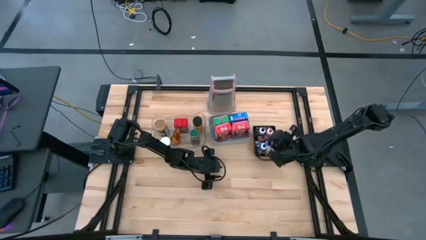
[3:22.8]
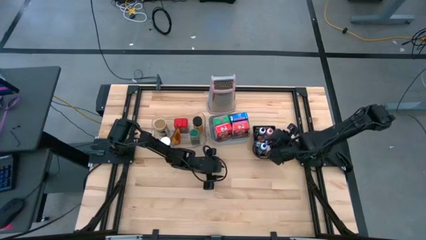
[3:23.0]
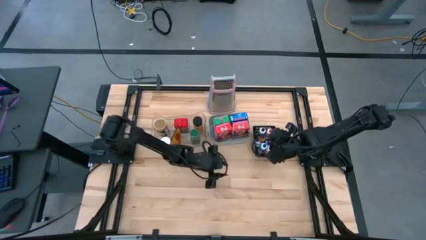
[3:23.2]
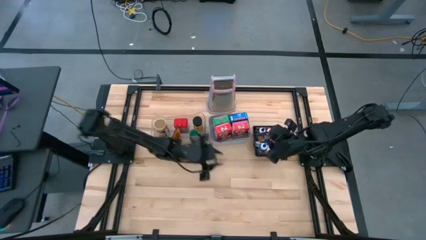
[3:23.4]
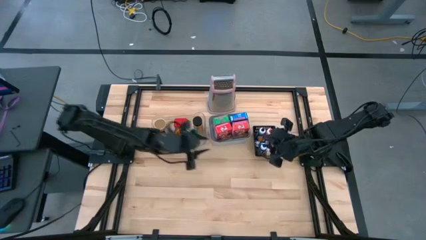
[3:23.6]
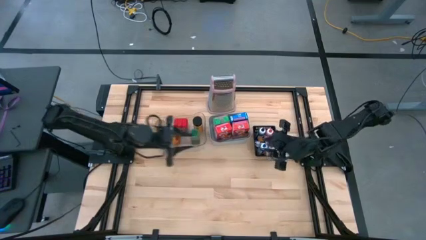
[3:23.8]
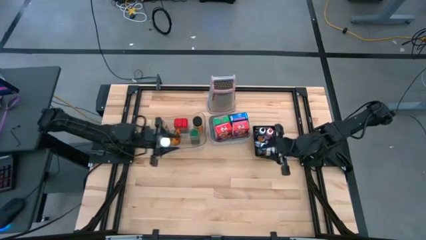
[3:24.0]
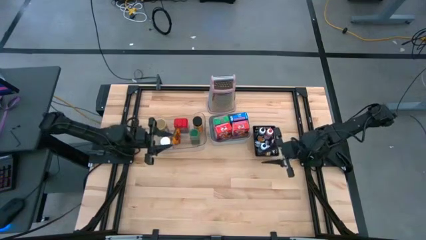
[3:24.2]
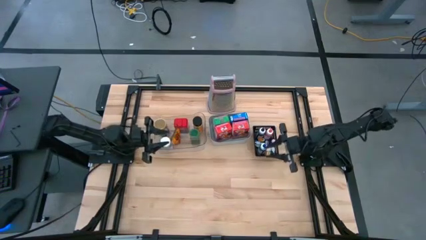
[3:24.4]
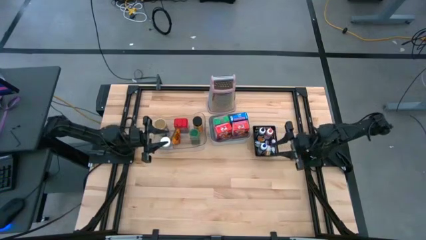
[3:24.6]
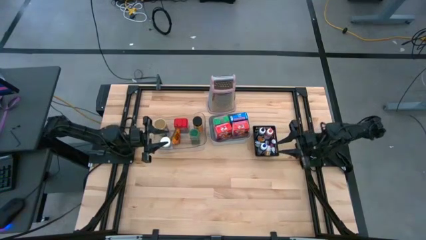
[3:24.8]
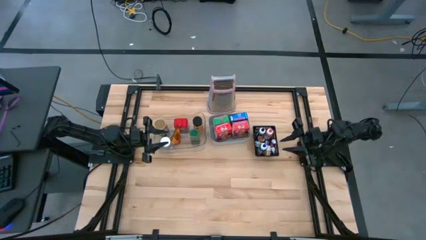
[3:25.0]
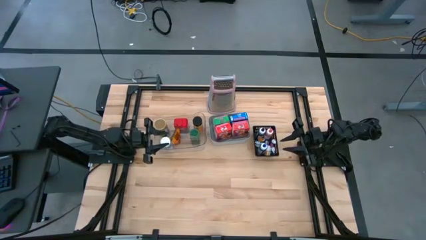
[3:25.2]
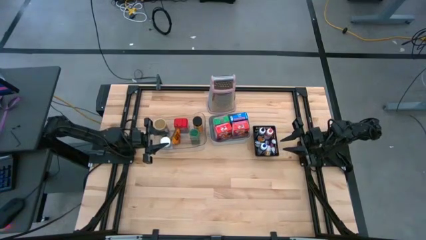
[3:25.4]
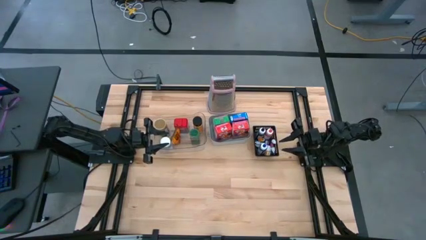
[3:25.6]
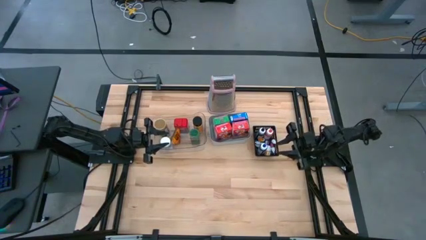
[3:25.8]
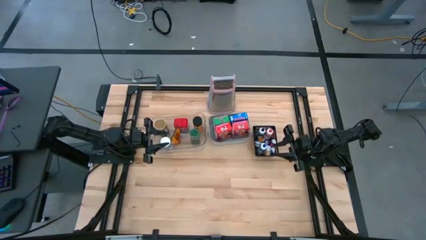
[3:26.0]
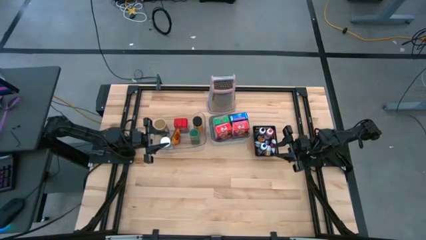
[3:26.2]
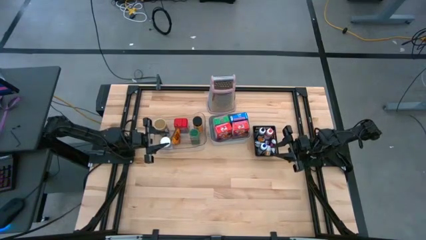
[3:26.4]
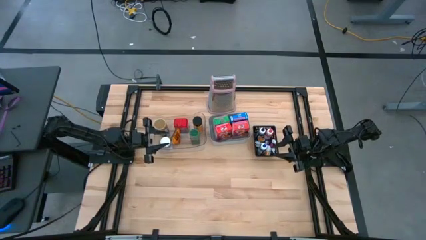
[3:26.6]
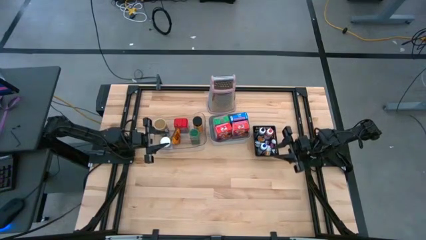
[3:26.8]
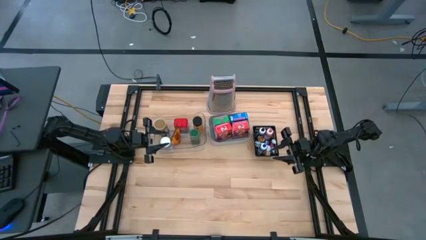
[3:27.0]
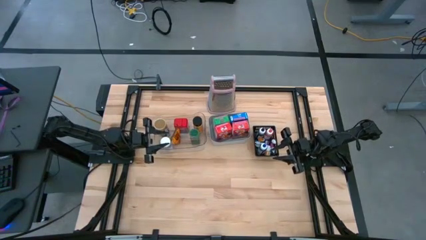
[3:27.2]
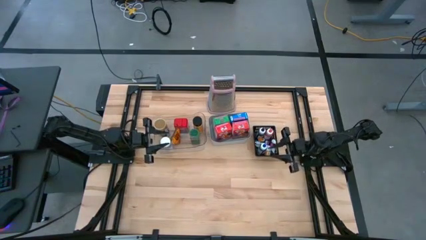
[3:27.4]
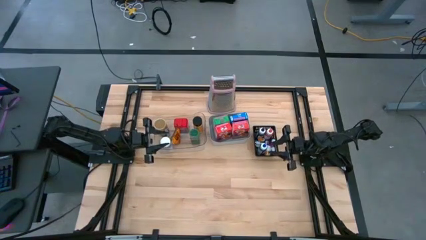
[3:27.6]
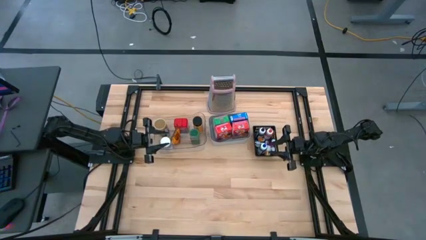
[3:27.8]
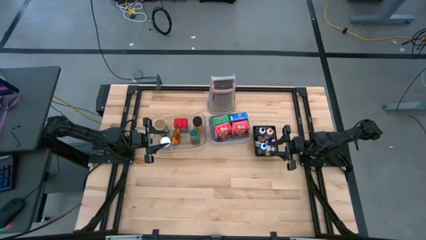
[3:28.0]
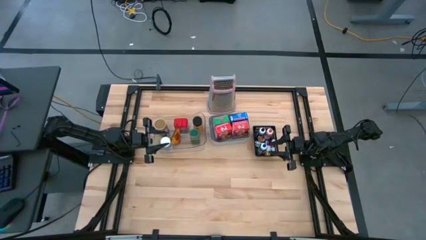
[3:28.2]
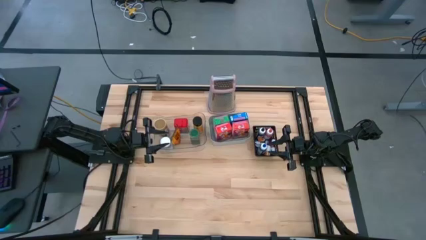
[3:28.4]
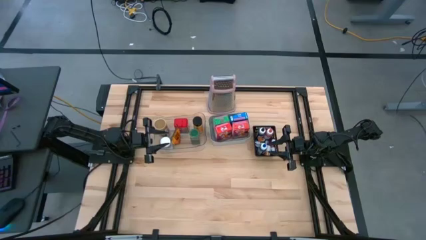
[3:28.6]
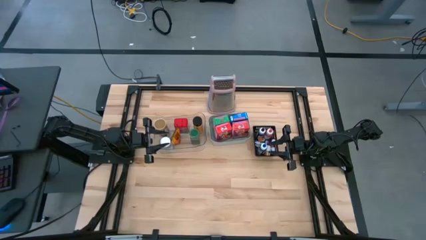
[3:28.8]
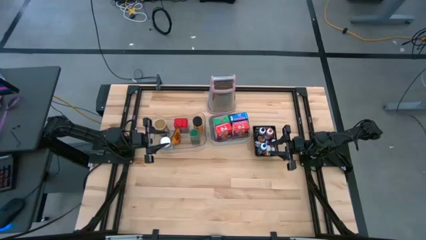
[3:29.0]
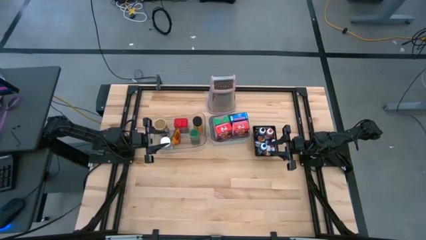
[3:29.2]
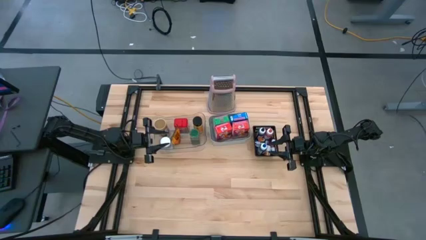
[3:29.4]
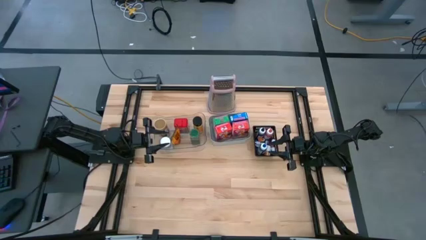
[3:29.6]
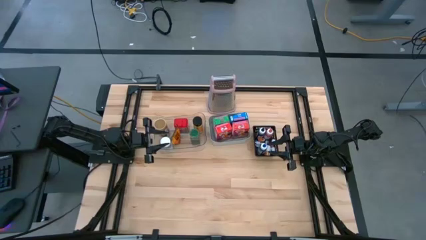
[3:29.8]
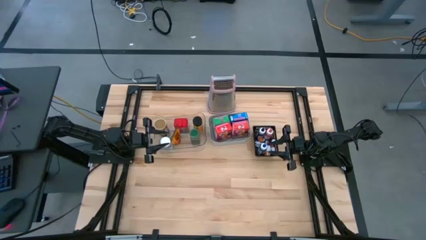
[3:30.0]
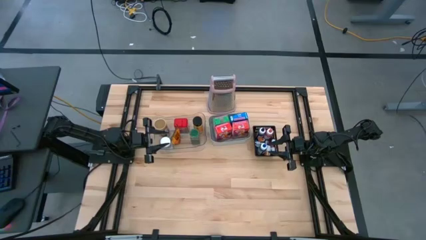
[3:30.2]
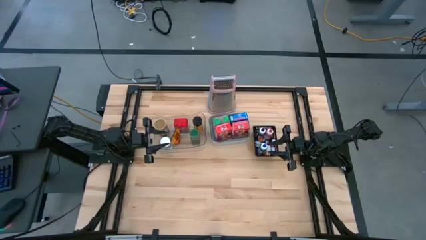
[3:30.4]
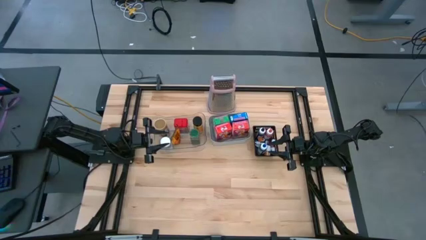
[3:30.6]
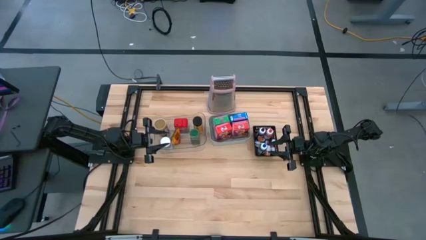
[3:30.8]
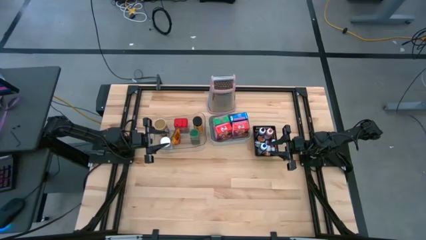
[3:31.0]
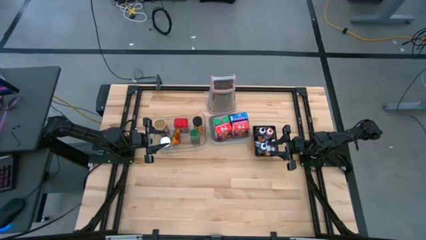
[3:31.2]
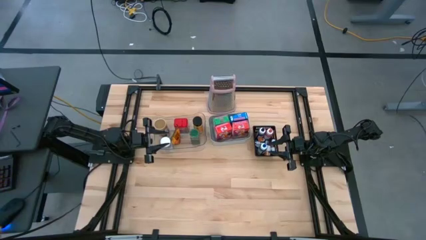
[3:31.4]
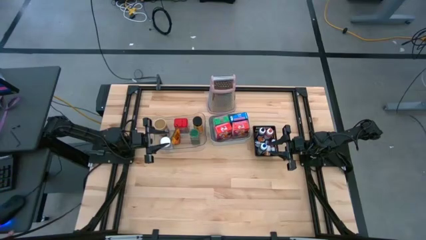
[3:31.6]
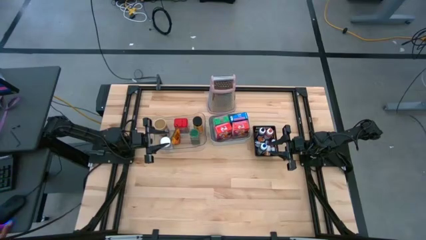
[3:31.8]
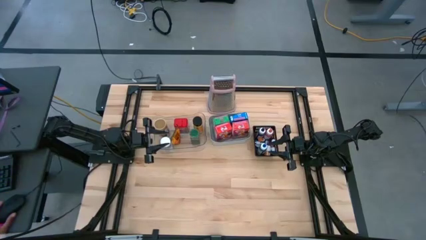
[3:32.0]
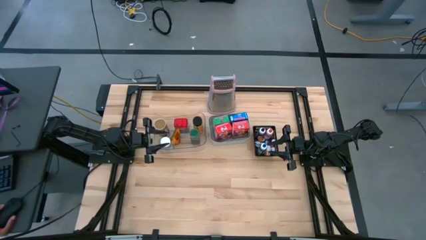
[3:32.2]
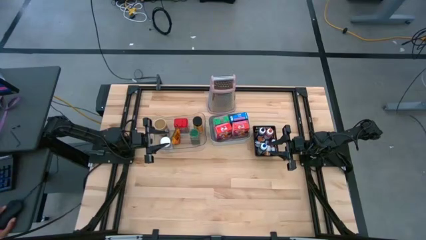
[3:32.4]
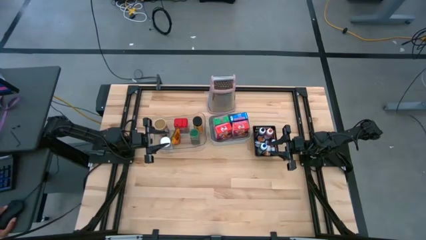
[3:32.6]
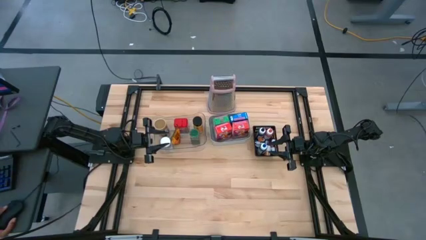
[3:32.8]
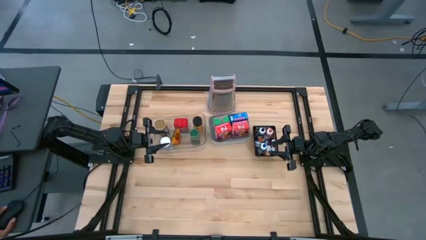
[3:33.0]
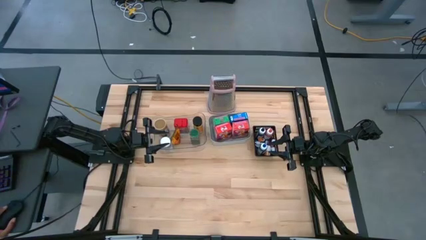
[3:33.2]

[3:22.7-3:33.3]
Task: Pick & Place Kitchen Items
Return to Home Position

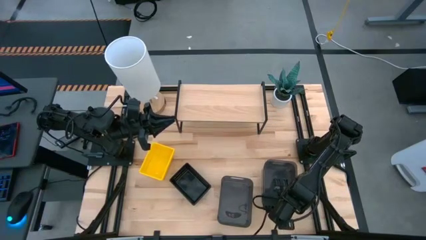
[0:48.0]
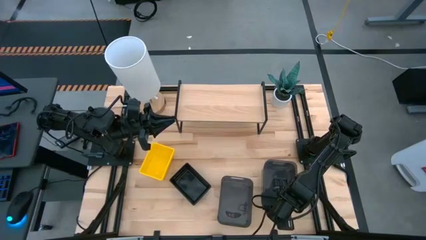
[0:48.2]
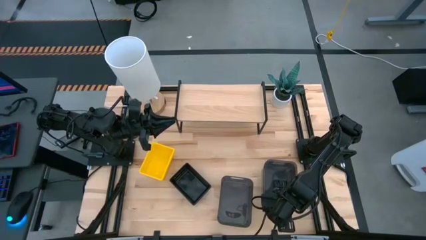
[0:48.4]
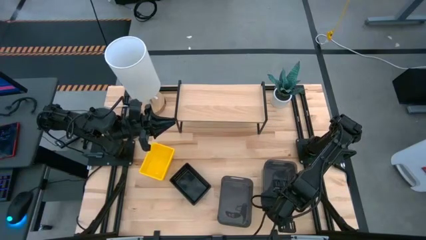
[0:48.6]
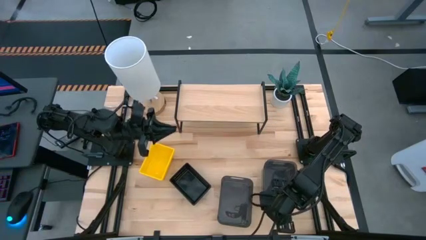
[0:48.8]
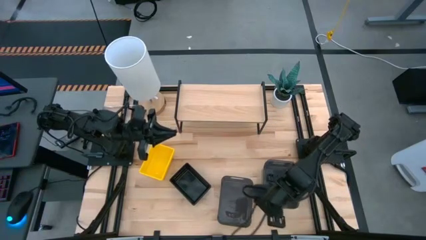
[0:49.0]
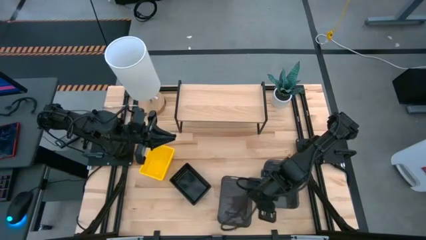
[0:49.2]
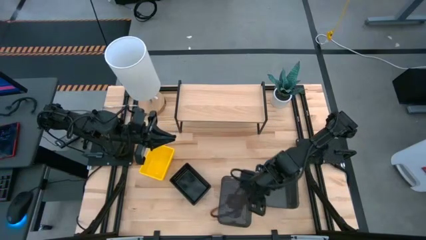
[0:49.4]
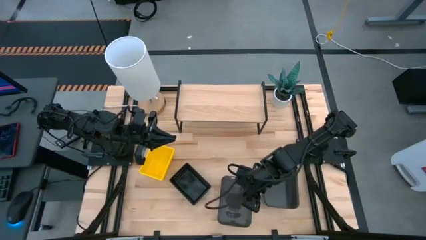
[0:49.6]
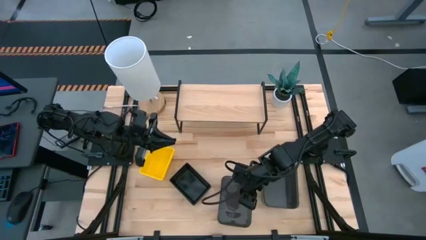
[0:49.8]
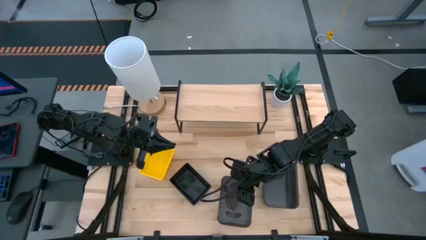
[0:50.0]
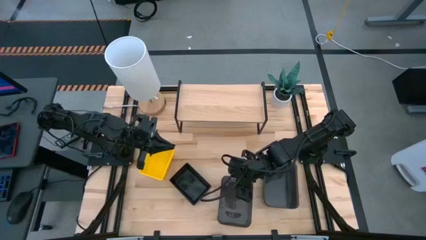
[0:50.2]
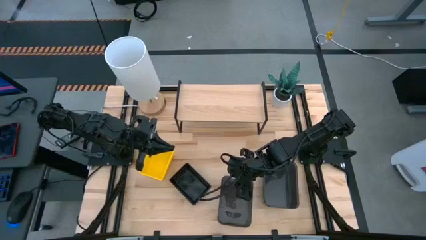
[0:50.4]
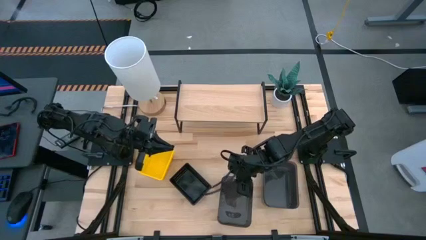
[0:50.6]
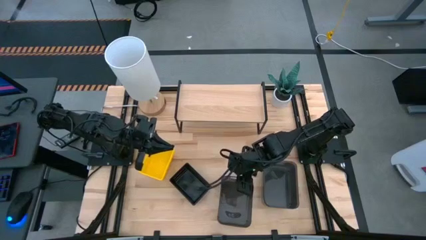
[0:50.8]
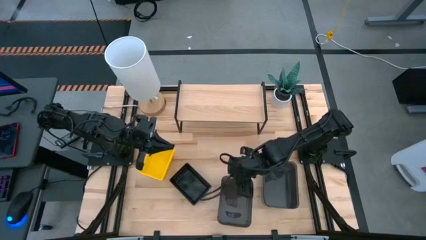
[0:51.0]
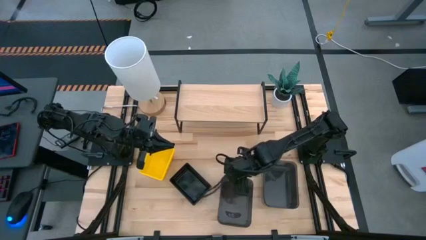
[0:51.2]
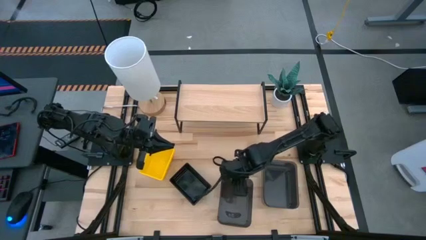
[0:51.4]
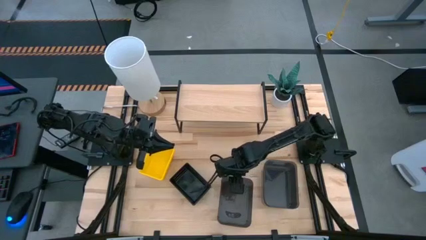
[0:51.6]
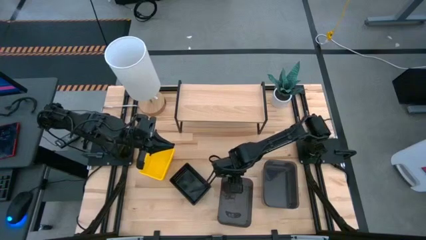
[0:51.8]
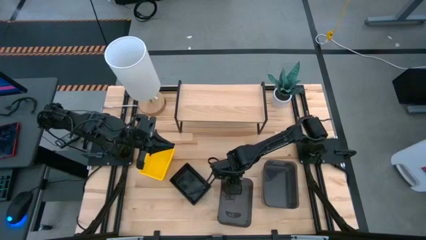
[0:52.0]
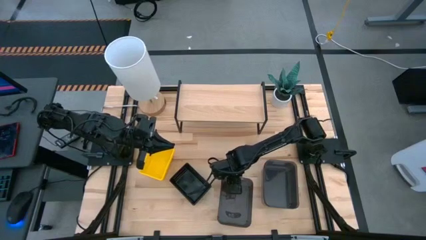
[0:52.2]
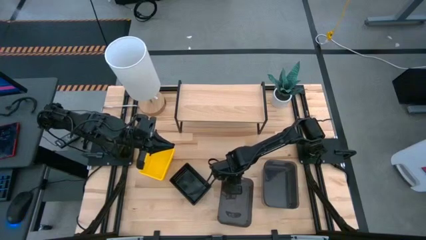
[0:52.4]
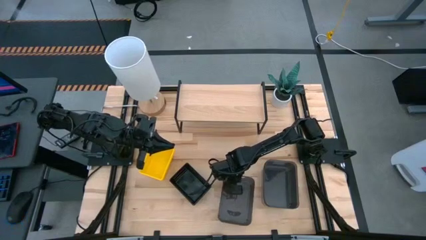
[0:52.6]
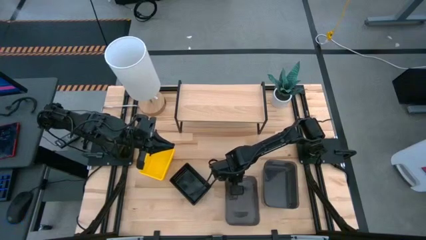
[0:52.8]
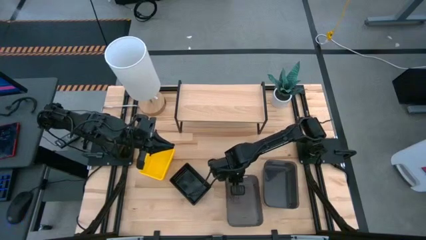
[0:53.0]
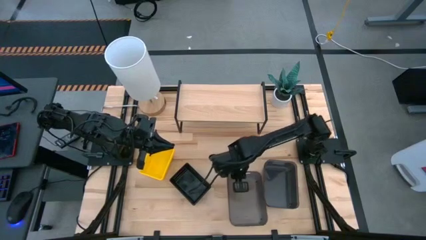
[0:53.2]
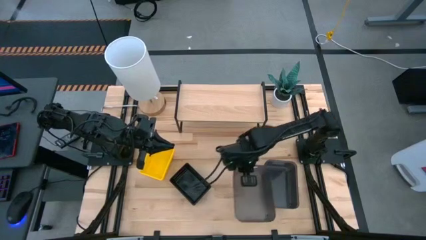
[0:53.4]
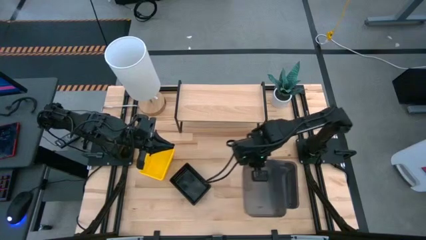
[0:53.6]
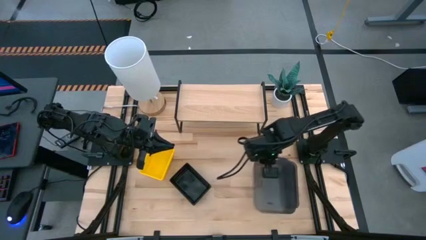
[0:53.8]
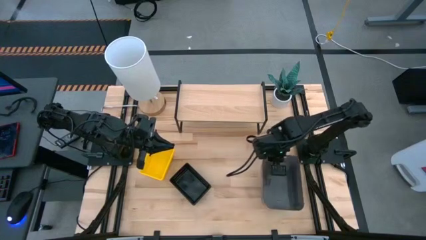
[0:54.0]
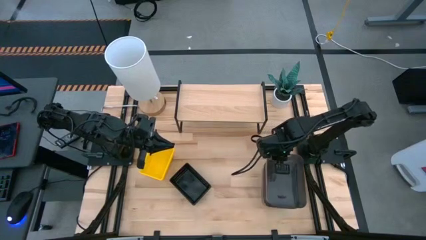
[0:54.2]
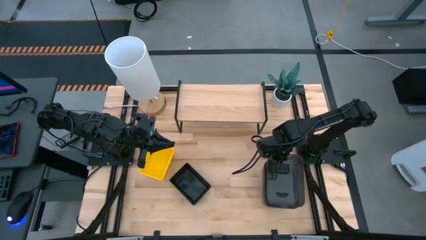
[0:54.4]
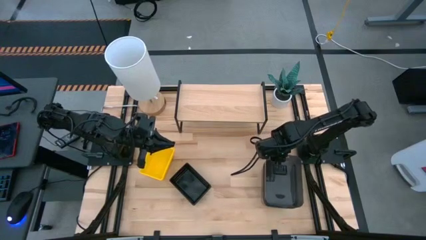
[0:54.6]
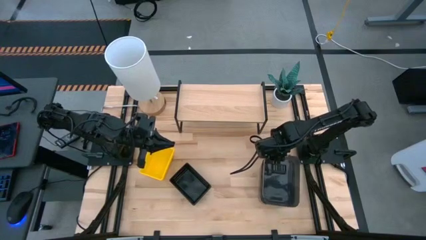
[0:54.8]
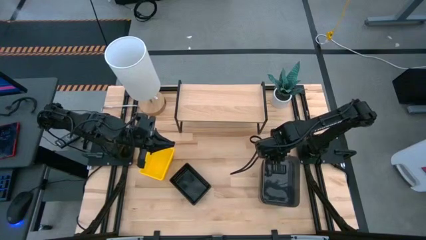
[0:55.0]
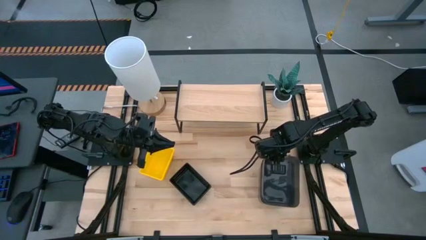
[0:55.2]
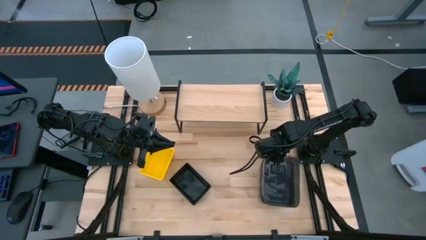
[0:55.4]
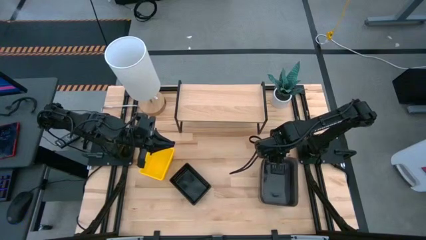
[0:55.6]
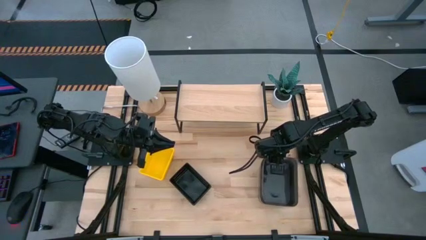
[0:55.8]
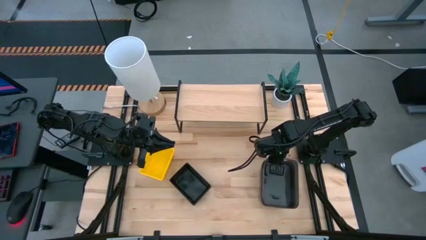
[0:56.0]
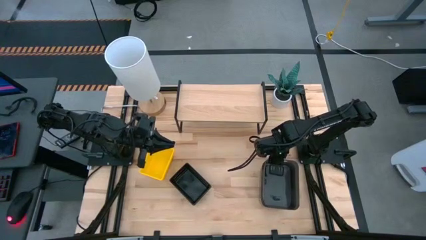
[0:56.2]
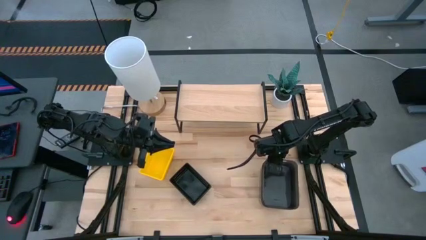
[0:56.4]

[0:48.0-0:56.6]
Task: Stack baskets on shelf by color
Stack the left transparent black bin on the transparent black bin on the table
